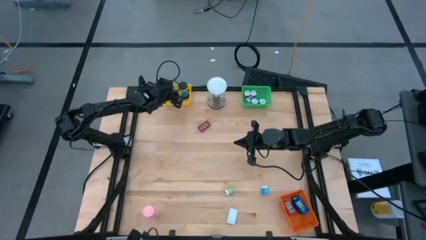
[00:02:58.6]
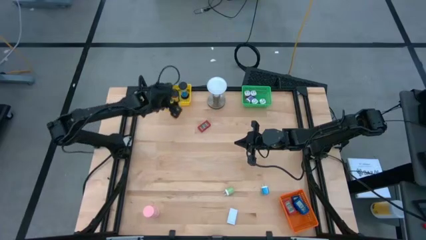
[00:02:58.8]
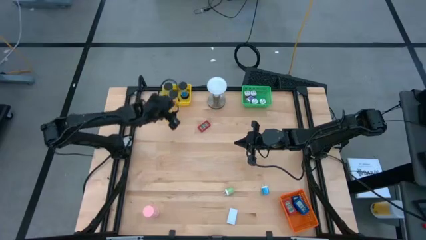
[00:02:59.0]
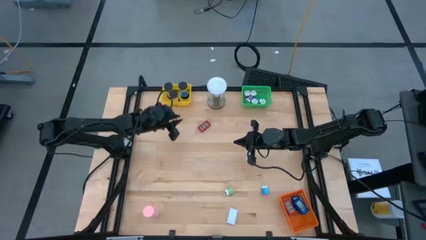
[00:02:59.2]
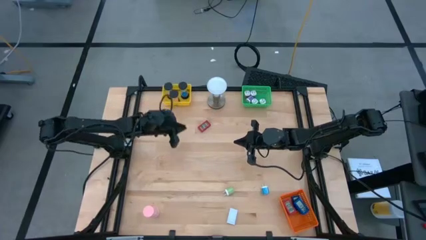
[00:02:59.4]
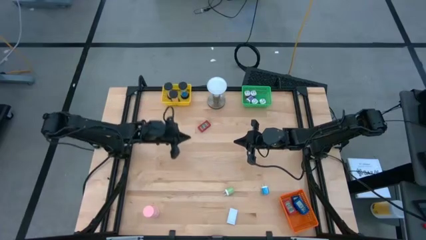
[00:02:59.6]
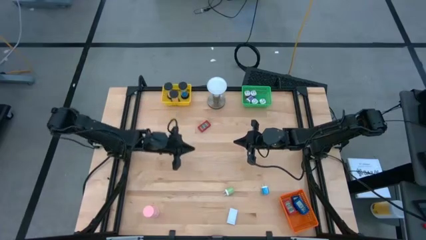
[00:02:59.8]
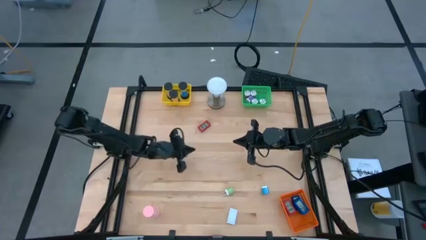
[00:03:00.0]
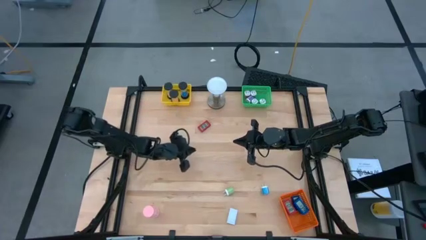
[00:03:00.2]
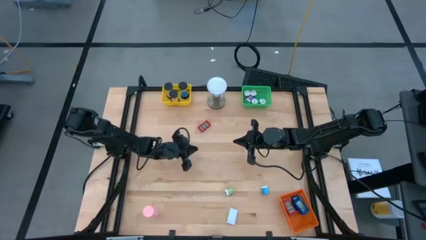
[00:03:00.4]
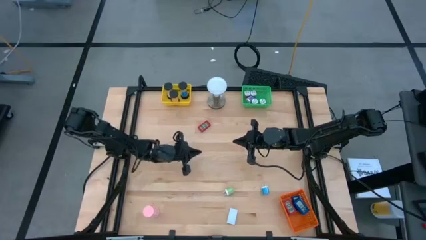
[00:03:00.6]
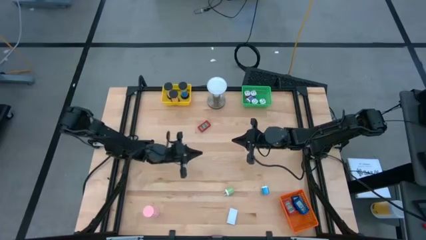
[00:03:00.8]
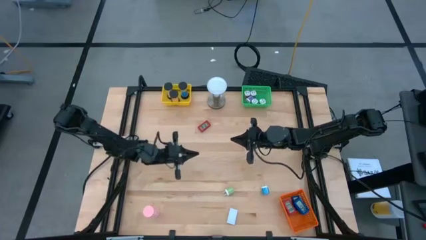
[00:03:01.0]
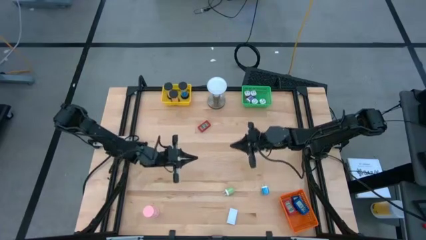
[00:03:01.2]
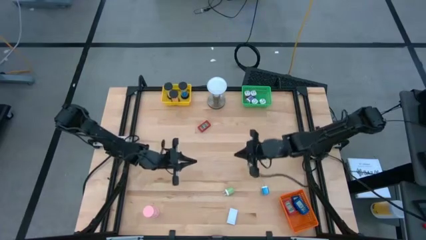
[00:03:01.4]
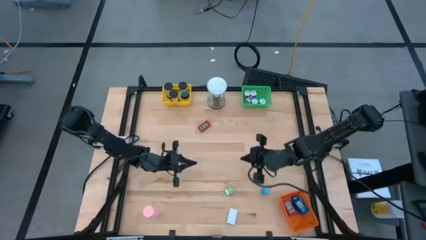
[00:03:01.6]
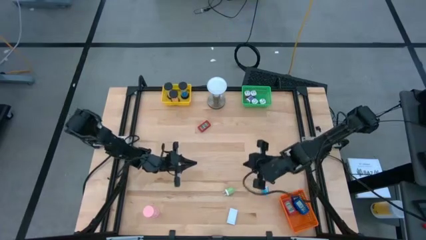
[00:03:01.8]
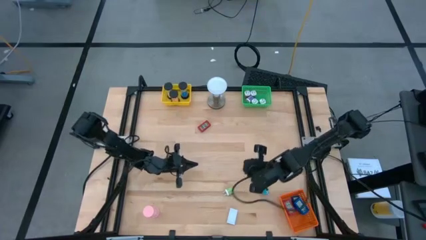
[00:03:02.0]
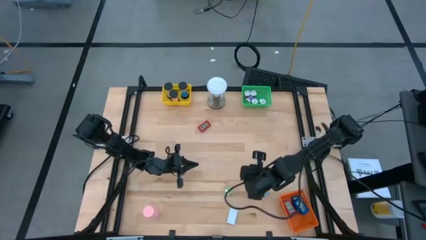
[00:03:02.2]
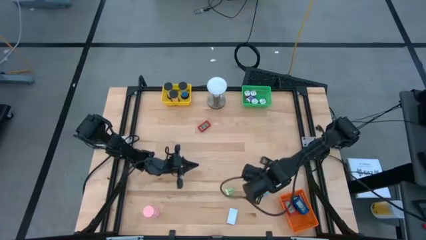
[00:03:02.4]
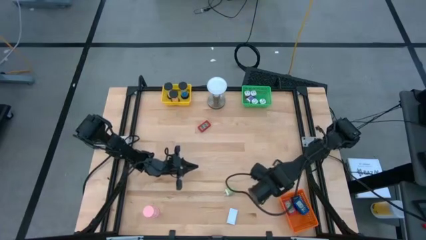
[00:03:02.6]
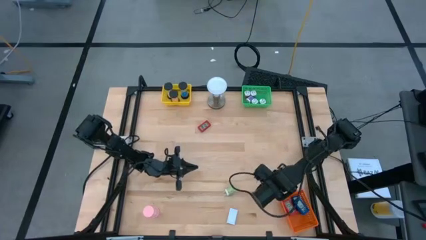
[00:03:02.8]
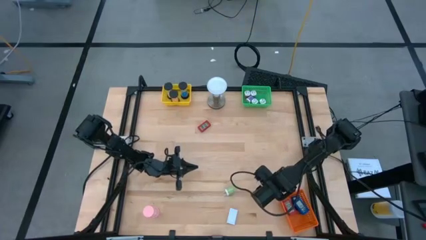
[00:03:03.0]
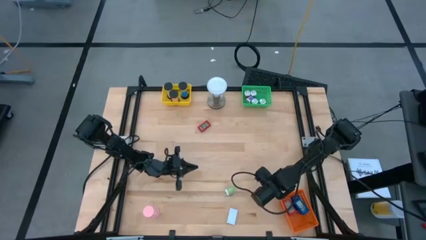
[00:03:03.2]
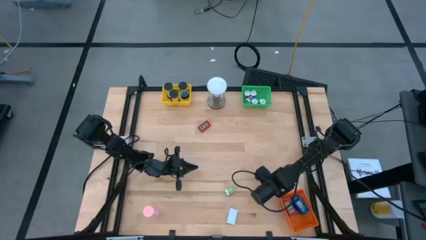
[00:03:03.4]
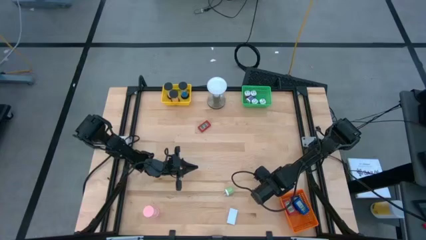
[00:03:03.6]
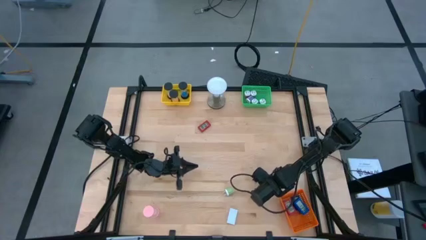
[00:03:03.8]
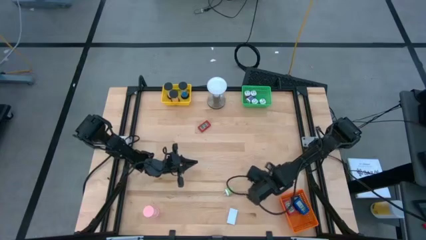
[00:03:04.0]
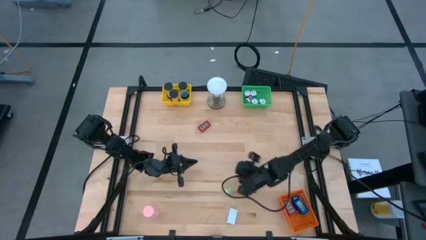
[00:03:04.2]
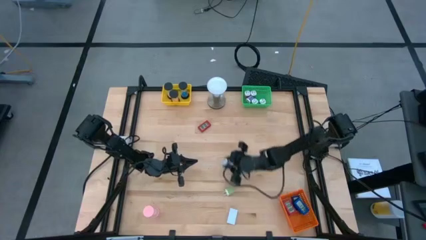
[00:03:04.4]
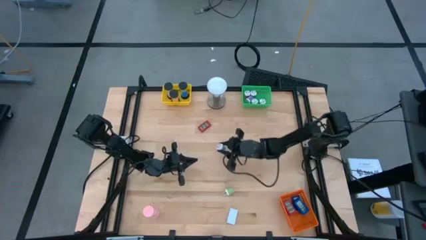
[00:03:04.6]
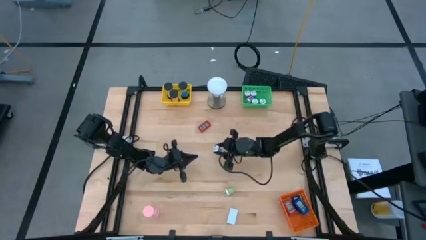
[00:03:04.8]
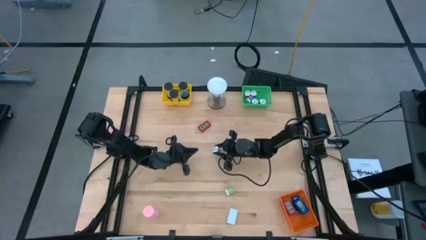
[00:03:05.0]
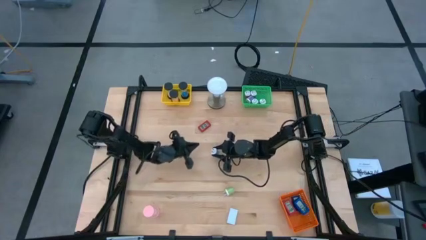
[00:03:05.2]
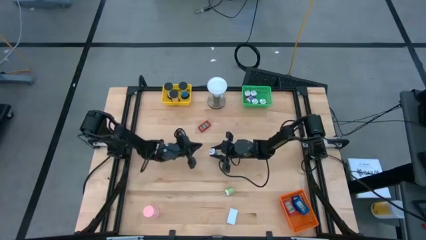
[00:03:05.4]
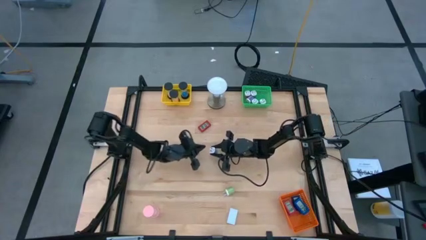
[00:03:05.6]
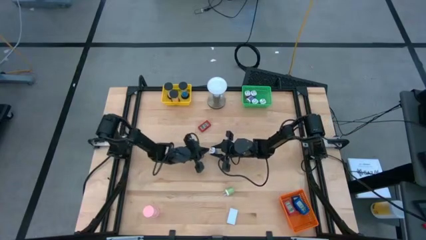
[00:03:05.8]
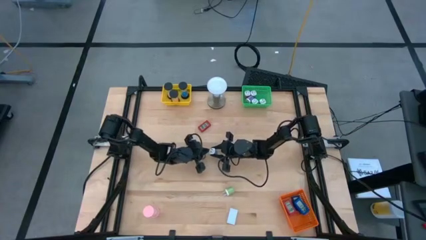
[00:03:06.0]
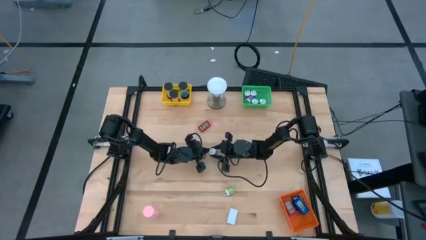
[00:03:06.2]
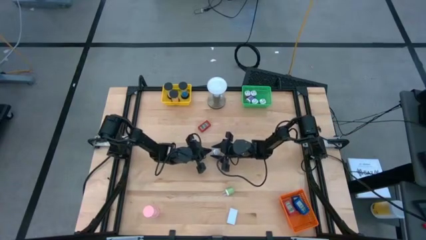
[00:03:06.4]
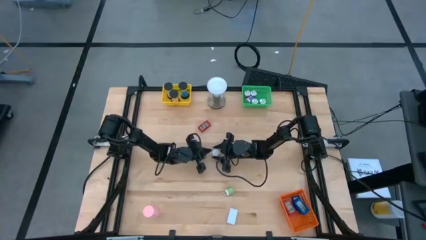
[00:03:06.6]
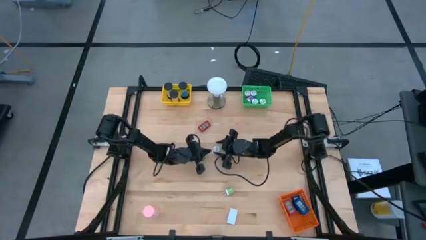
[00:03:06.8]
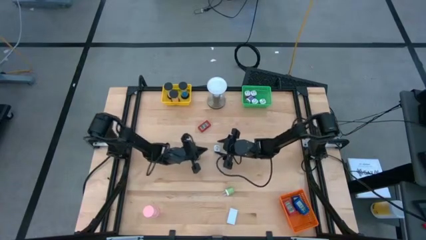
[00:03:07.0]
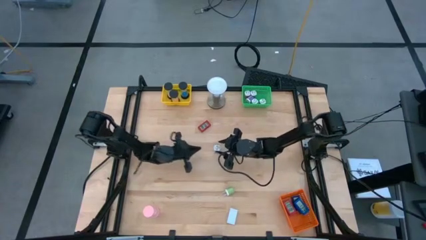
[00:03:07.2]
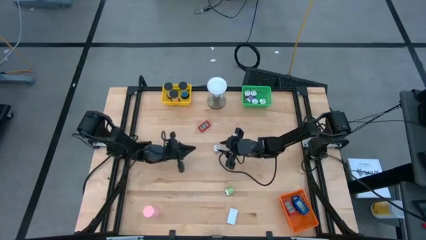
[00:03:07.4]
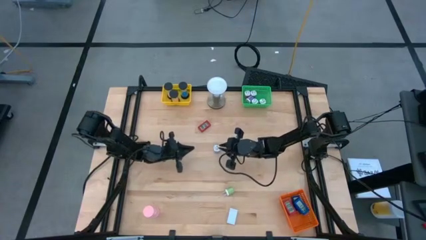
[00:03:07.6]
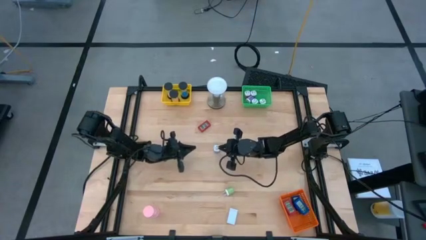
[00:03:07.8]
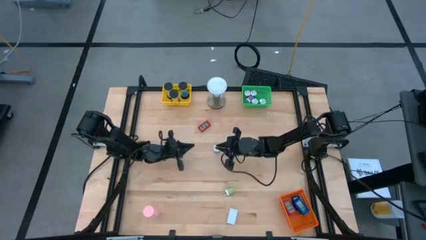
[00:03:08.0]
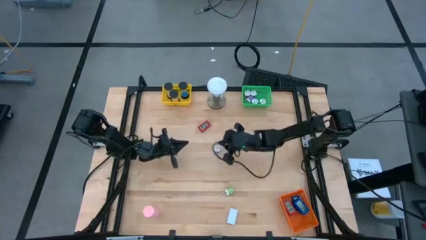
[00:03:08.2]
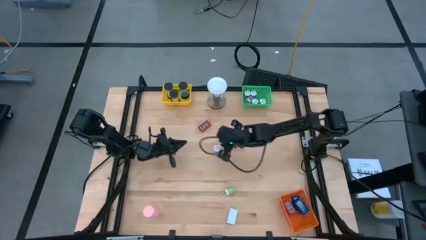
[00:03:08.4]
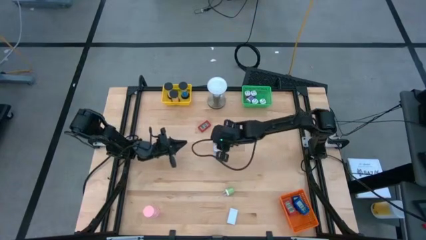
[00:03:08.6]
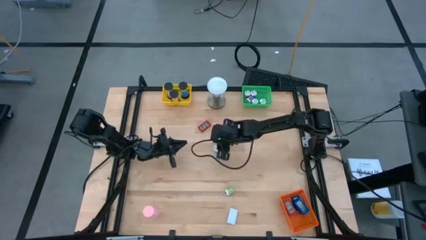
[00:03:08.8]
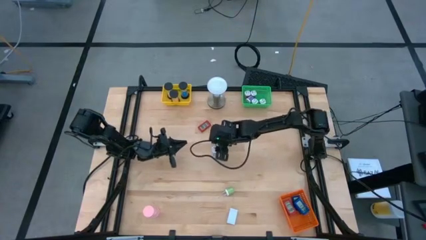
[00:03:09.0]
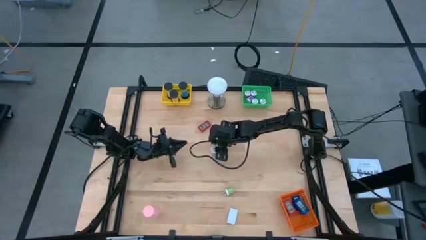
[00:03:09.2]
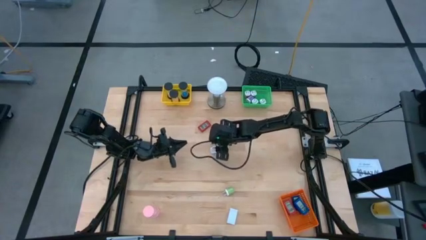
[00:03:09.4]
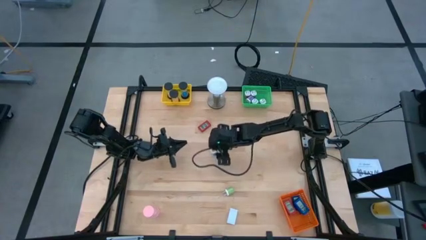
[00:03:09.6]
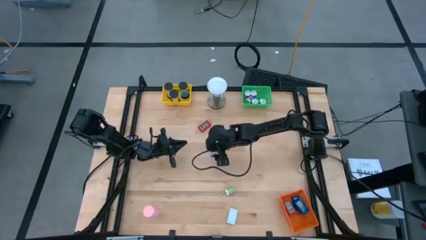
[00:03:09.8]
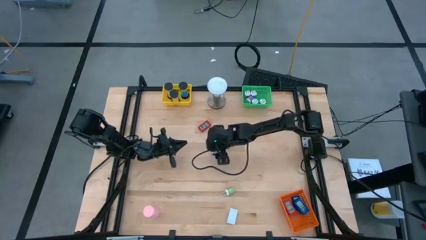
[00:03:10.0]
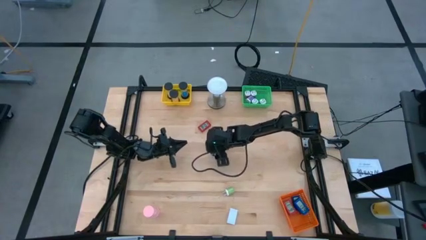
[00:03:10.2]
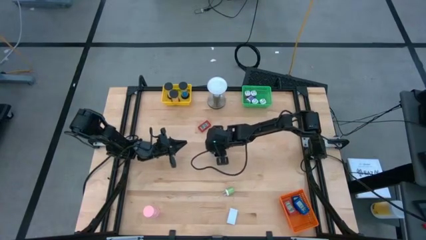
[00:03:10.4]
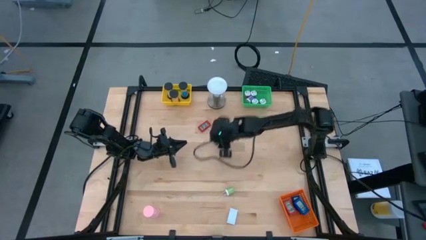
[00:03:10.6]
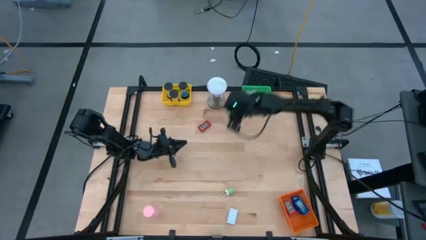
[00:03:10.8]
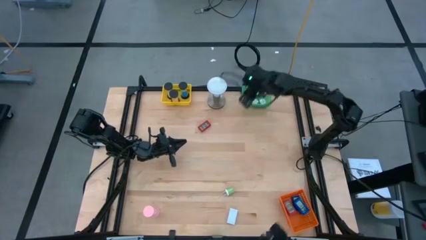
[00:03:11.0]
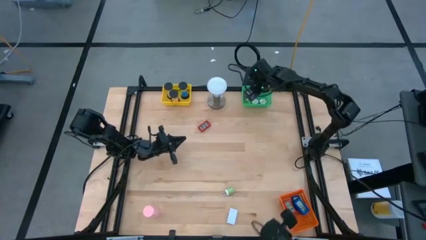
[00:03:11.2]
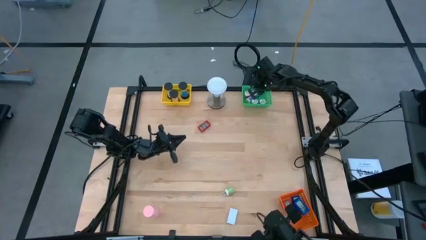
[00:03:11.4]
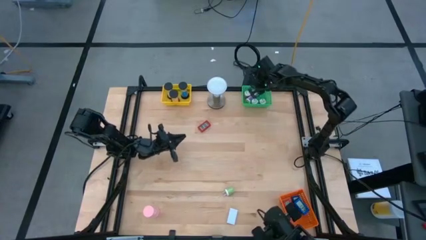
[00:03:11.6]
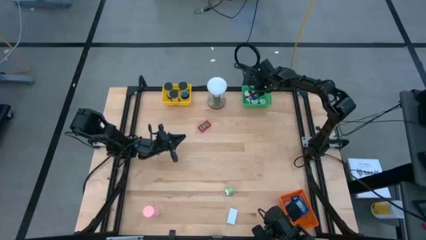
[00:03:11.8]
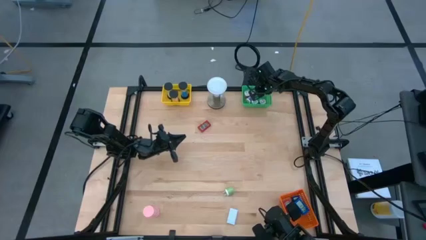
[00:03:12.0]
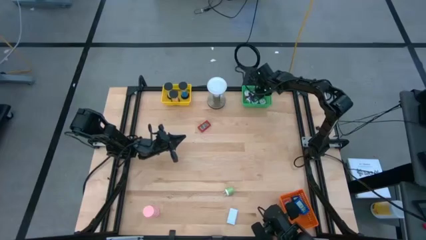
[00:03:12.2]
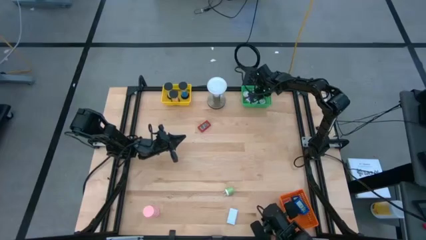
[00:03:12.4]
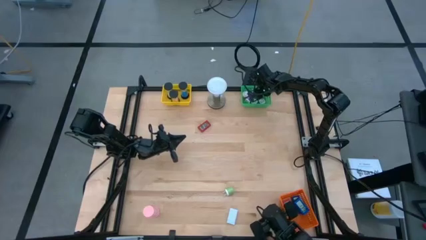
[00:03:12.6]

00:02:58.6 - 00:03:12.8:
Task: Pick & Place Office items
Put the light blue charger adapter into the green bin

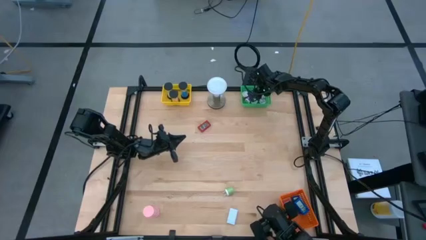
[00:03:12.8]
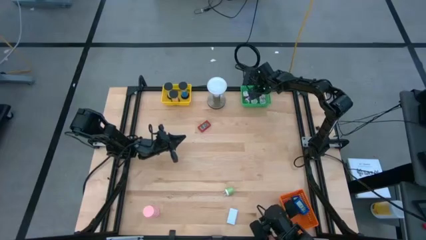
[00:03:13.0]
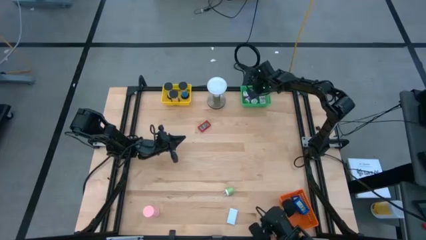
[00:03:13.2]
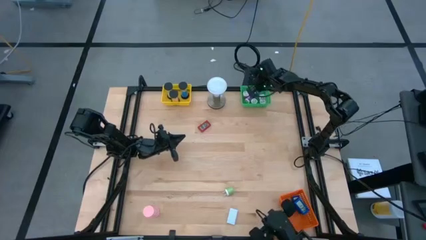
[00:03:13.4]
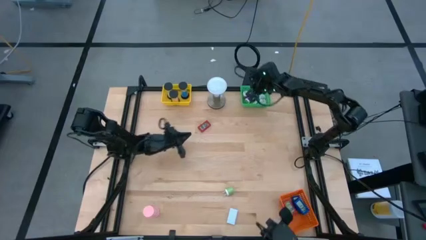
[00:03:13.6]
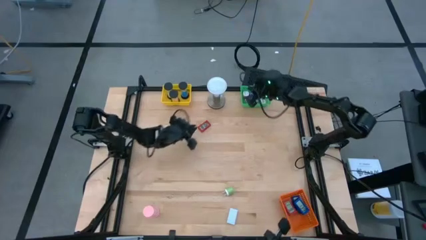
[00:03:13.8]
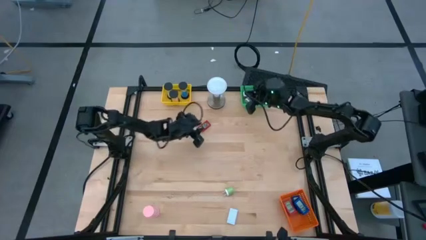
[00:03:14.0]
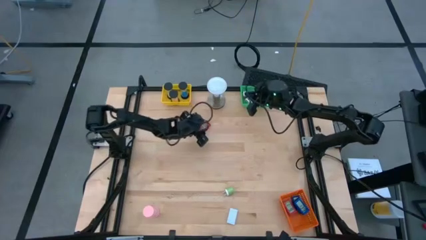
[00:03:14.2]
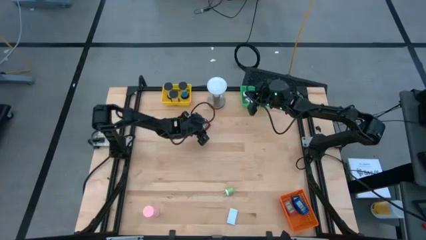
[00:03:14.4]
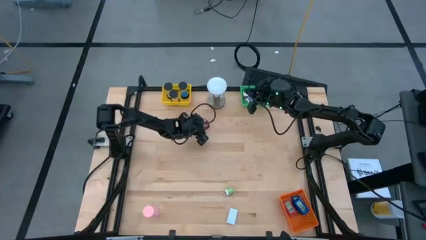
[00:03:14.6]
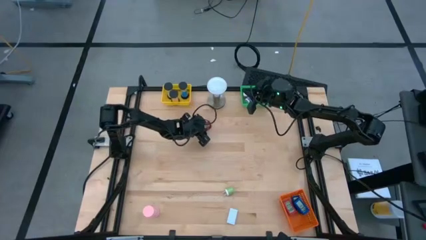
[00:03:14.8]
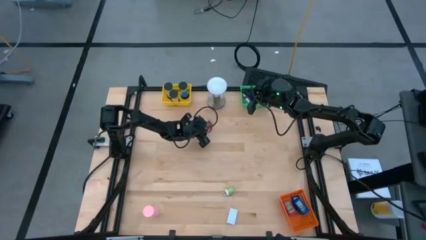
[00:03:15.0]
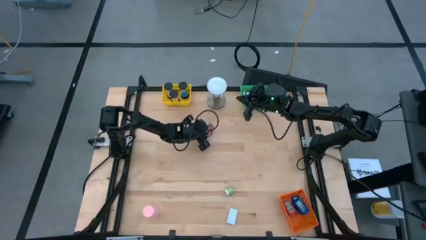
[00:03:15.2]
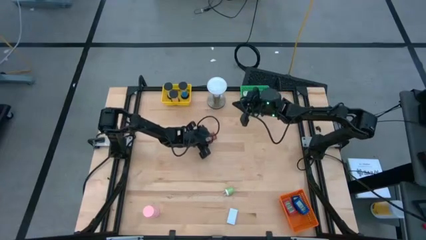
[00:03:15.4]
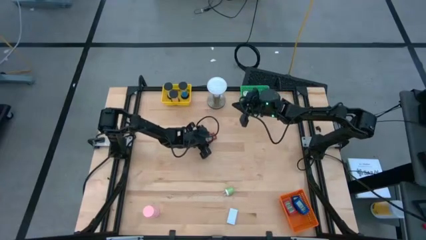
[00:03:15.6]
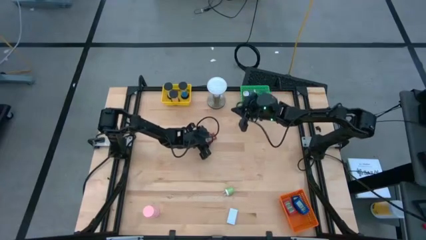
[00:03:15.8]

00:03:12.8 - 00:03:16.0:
Move the red digital timer to the center of the table
